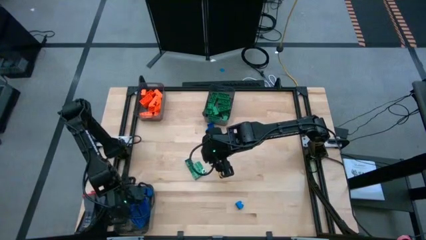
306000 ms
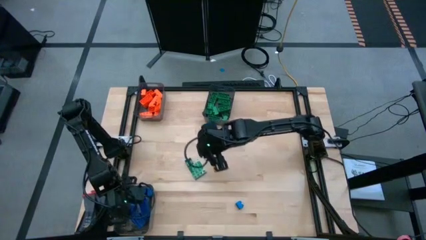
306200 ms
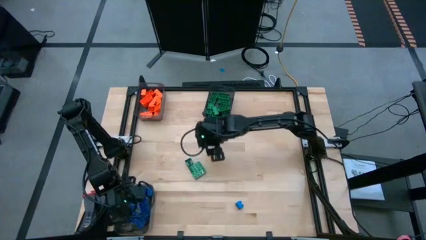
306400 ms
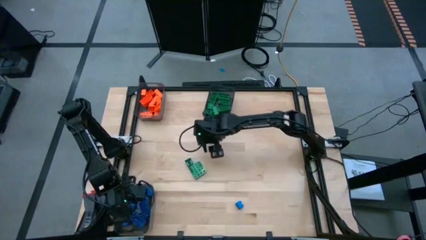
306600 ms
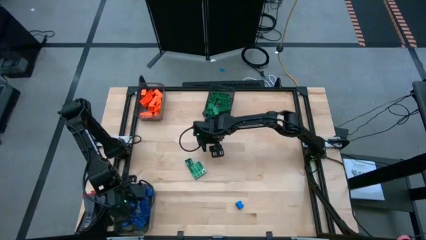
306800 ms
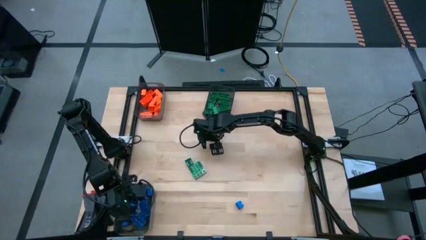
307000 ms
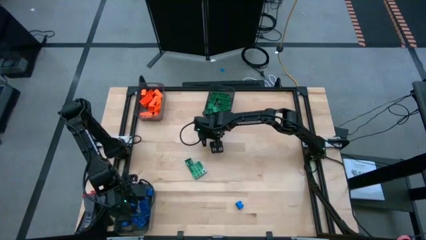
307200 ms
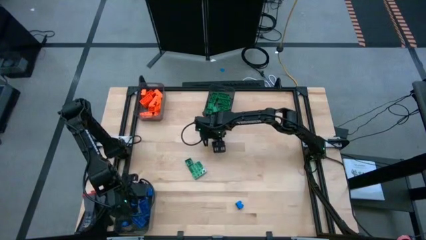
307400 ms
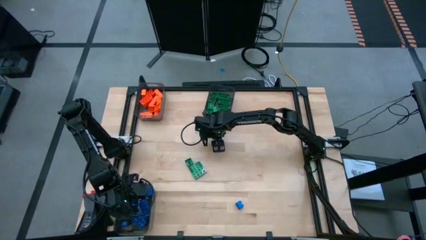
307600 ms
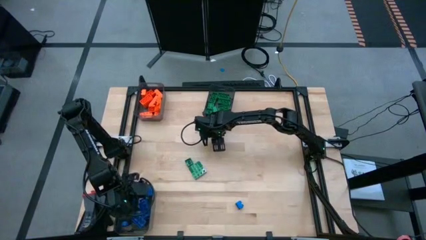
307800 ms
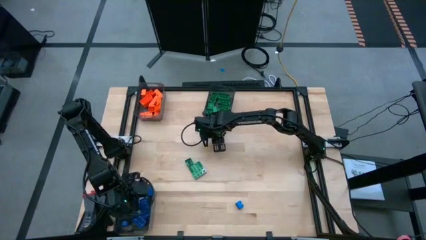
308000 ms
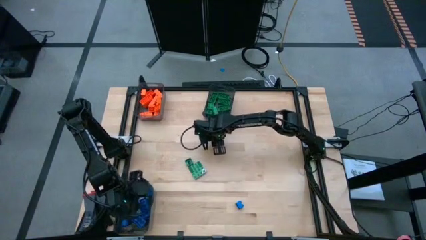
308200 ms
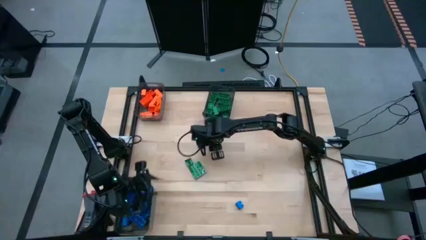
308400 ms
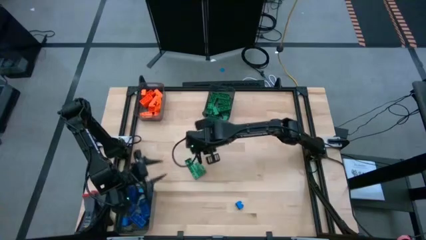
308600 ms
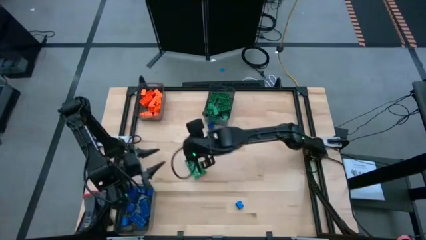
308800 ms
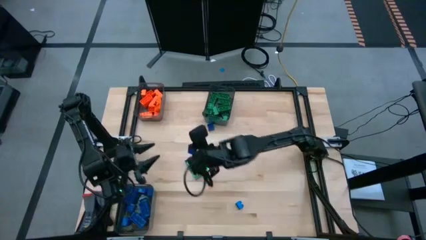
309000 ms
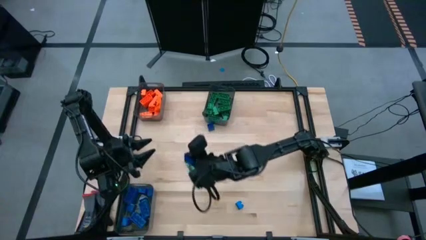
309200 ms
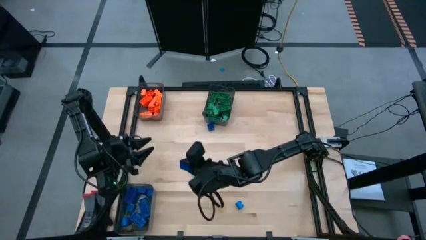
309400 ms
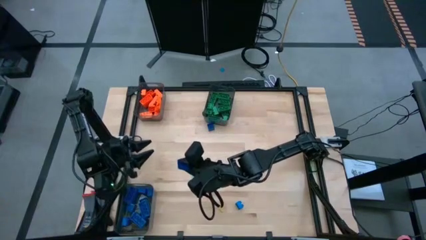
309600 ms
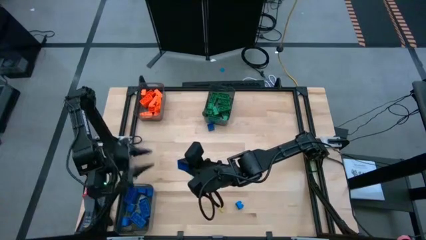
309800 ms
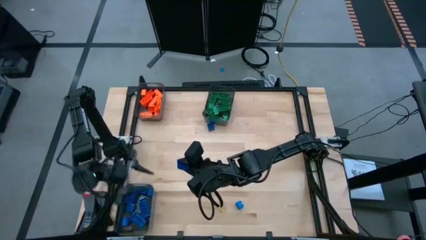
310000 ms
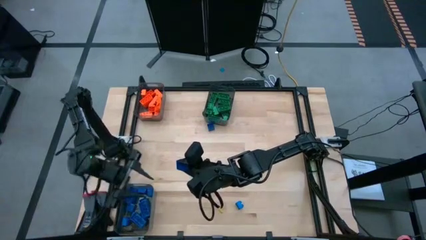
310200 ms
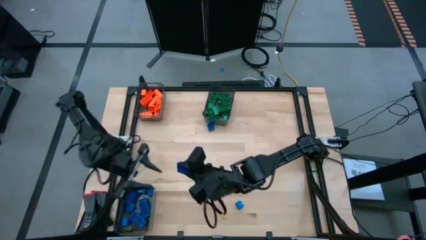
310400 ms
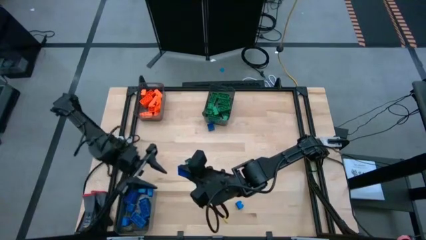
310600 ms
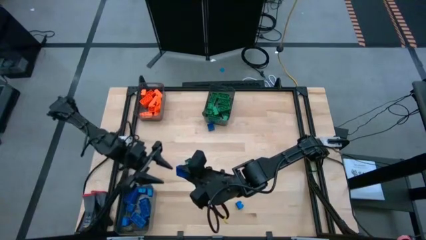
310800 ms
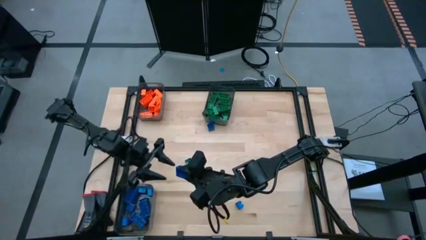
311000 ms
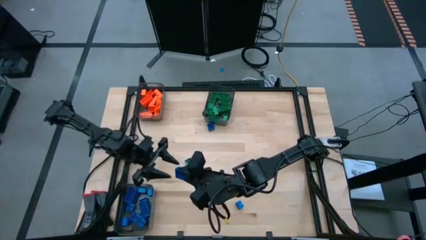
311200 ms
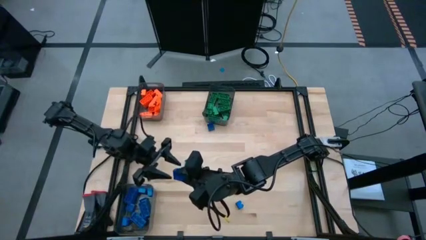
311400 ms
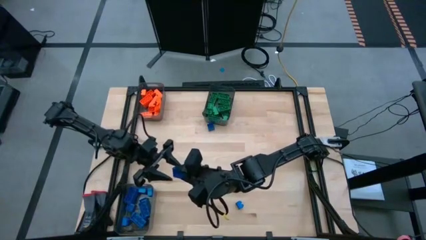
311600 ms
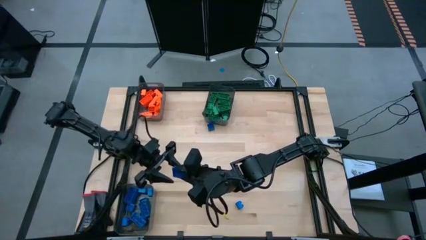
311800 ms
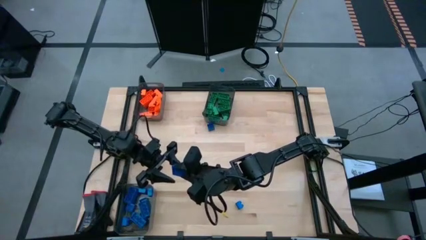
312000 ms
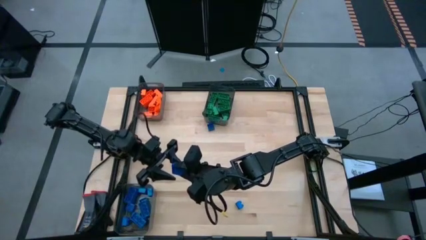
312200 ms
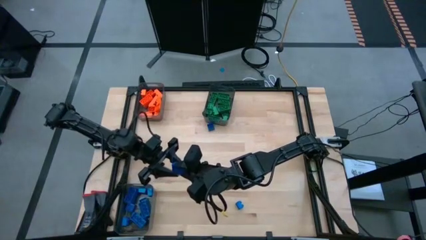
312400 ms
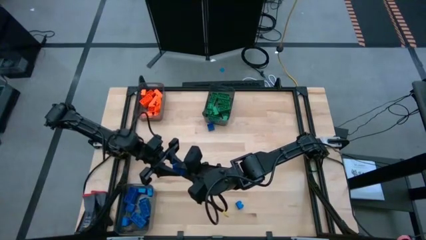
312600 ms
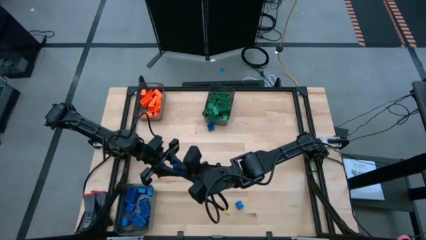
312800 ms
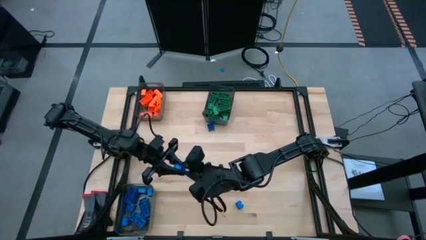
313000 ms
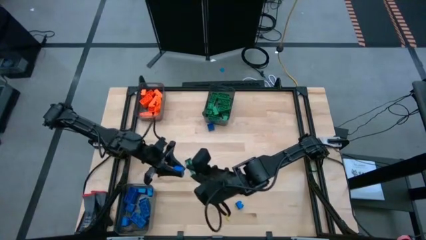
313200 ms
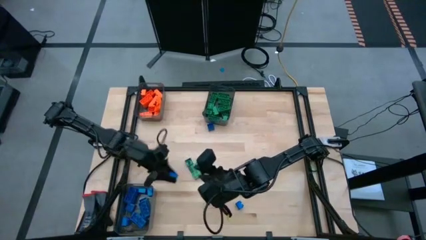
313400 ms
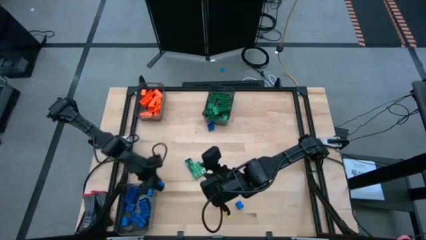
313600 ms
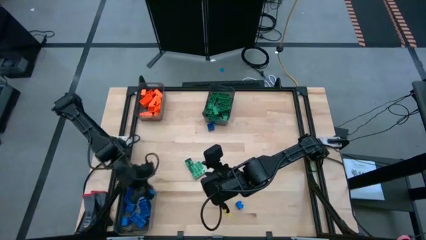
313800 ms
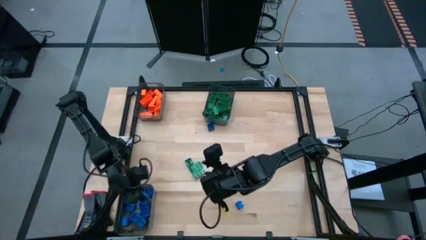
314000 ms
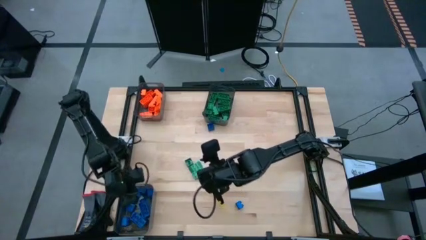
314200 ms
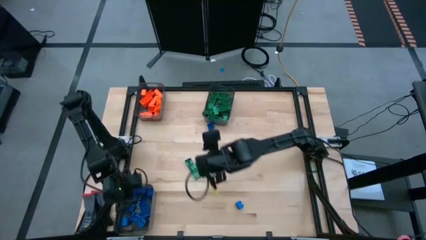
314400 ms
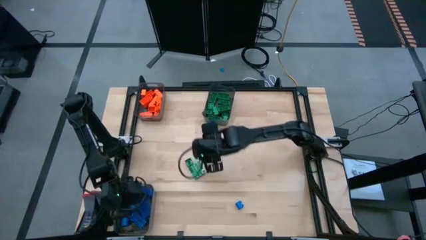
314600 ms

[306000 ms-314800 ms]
Task: Sort blocks
Put the blue game piece into the bottom left black transparent bin

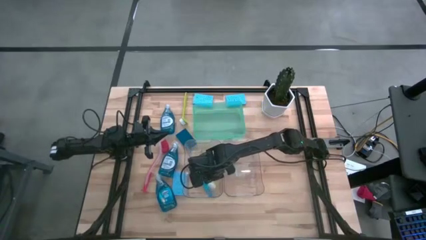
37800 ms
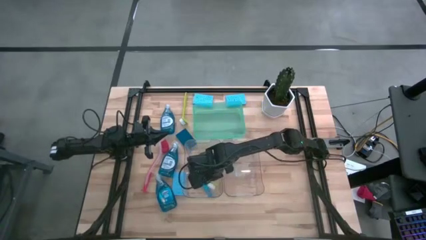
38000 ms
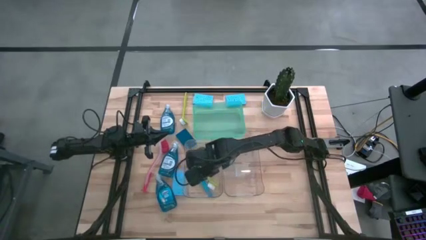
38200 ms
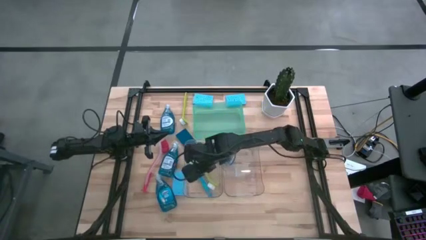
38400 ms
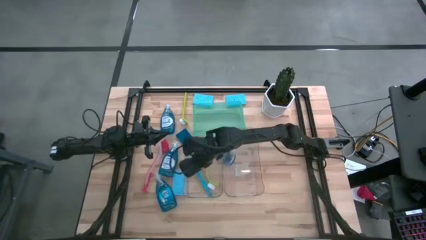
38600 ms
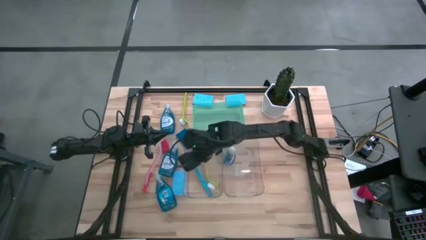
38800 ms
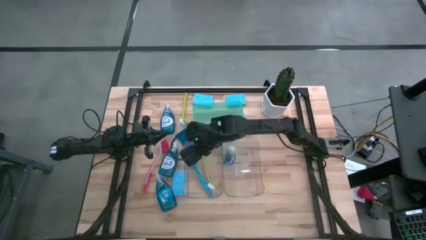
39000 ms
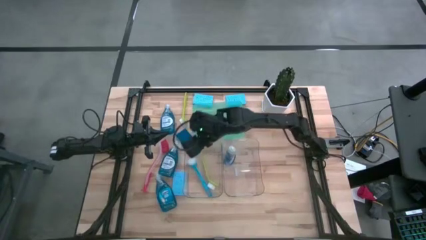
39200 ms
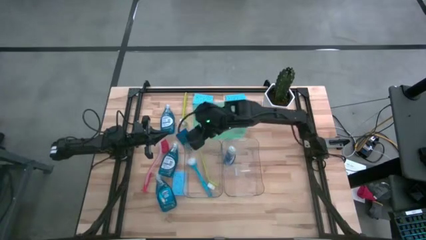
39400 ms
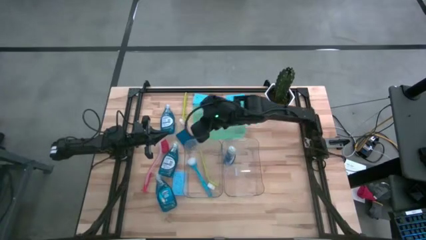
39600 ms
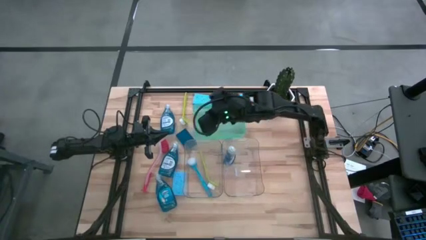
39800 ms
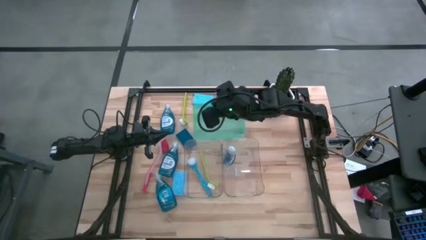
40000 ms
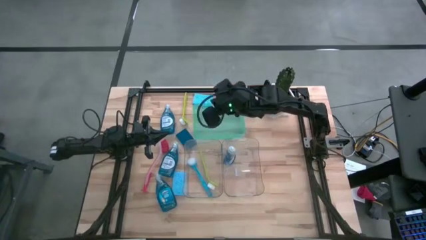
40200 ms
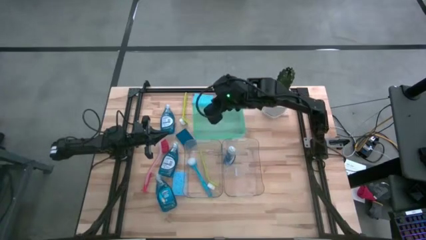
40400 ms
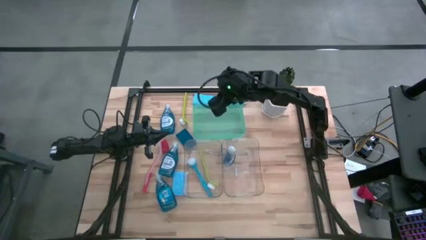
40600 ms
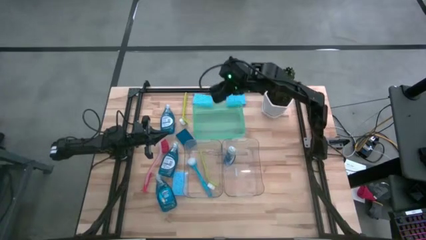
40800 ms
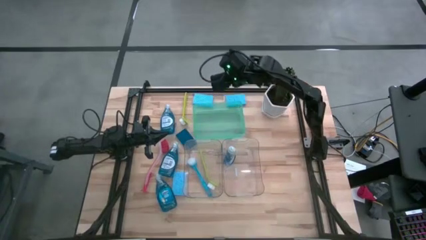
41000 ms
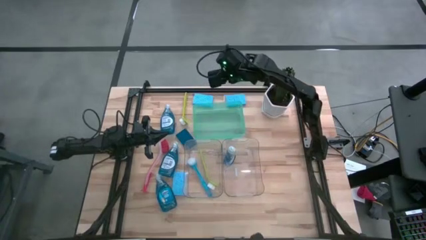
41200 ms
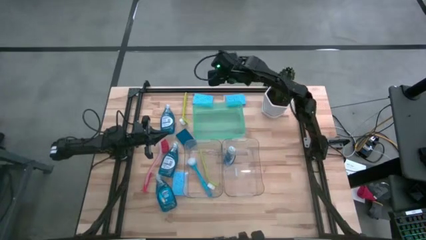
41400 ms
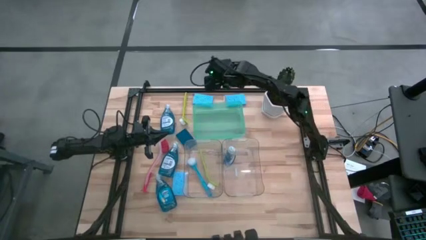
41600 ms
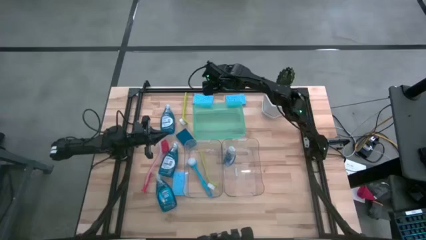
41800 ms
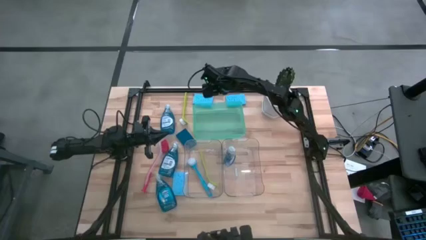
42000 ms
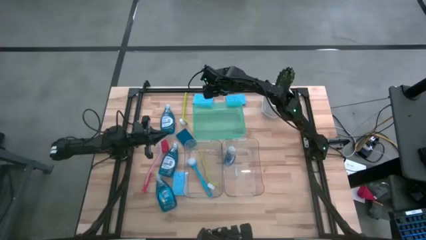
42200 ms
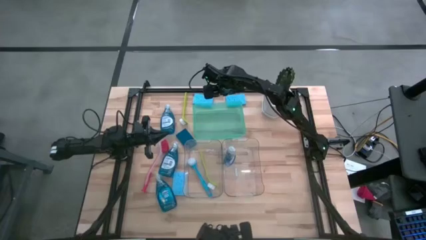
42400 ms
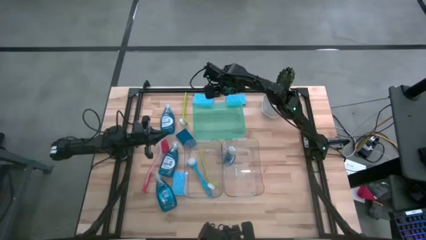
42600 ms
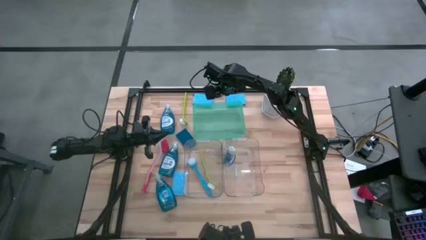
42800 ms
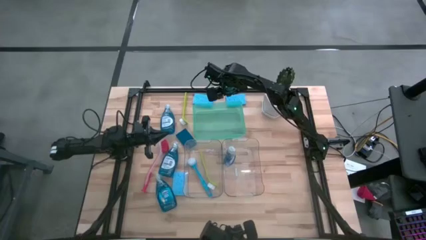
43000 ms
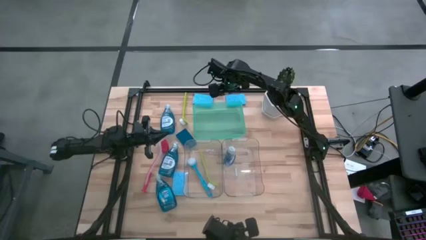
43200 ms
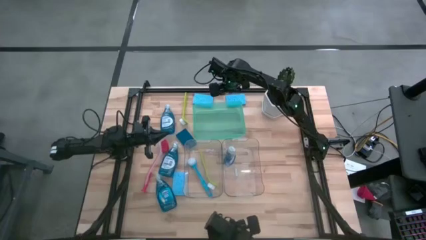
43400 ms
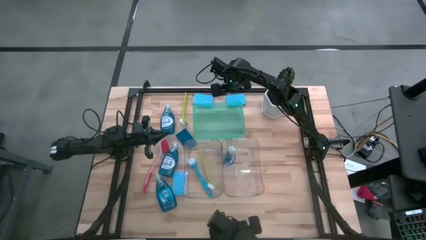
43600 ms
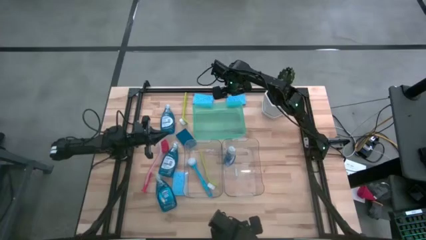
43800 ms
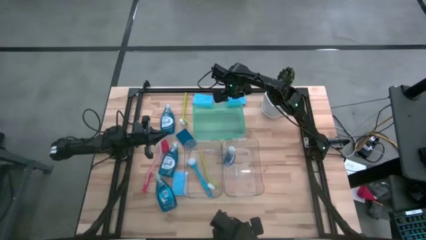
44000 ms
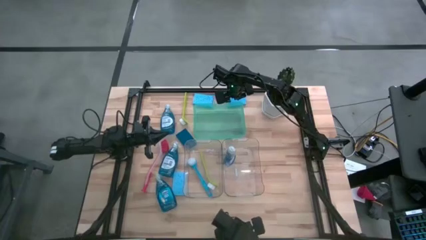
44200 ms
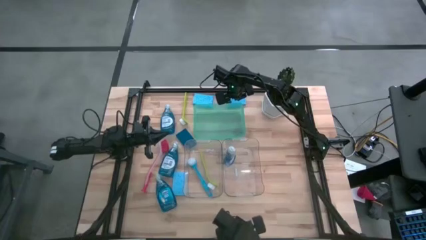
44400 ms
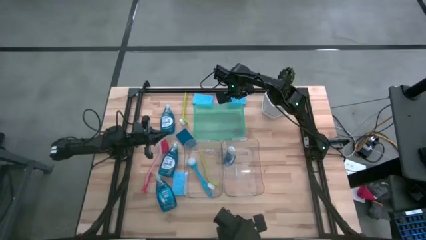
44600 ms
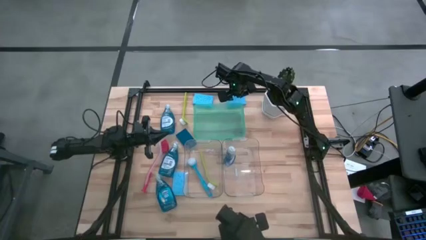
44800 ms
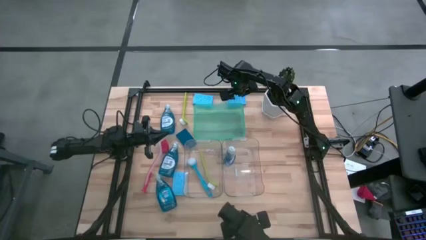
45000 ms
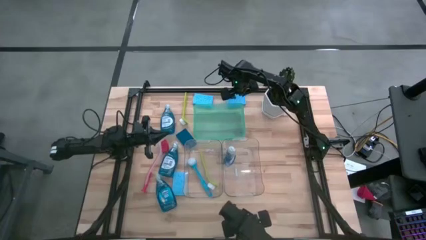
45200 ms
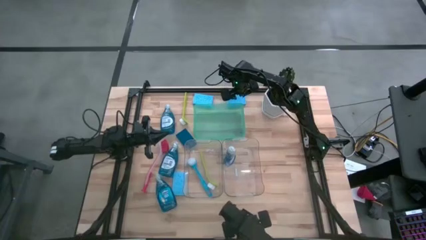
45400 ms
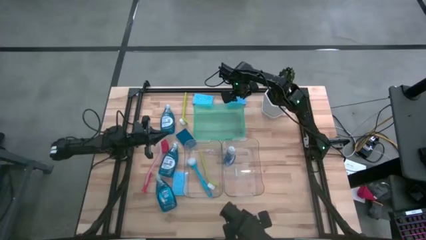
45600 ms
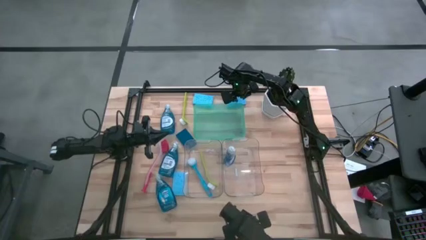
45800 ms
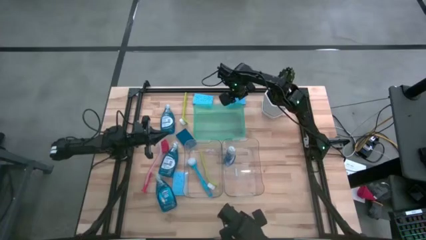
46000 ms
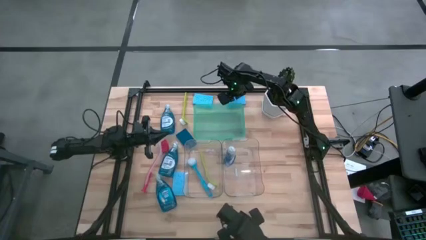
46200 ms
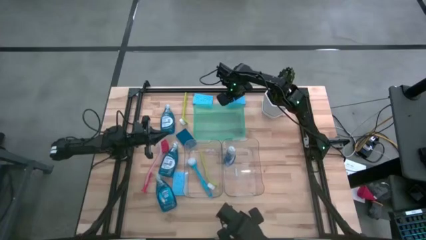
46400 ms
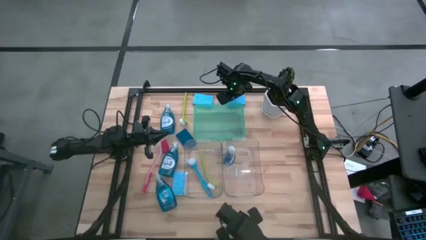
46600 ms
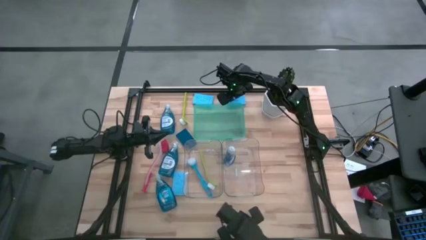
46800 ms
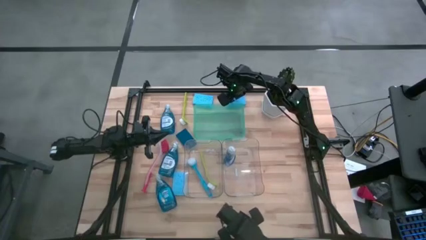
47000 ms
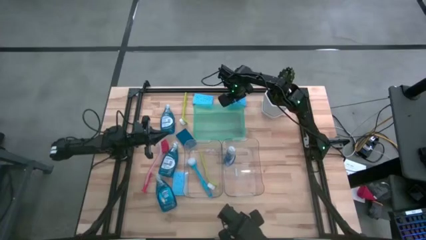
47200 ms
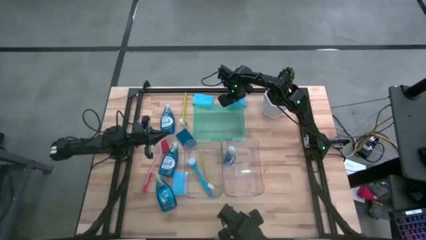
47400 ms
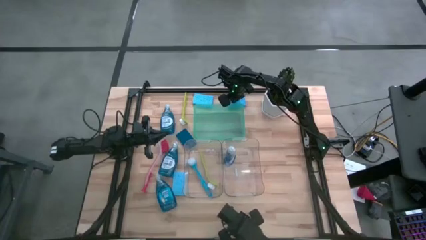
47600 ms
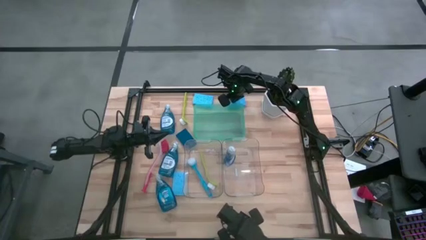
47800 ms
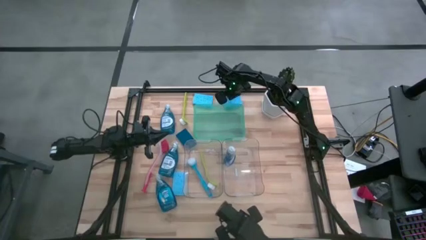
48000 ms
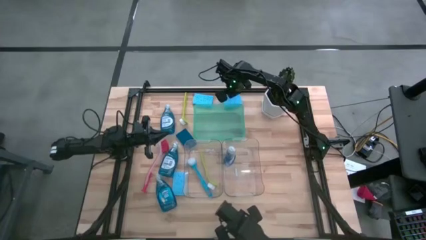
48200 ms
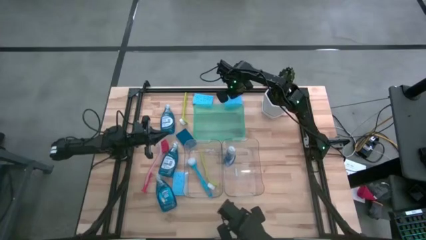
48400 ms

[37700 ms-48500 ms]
Task: Pick & Place Kitchen Sink Supplies
Put the blue sponge into the green bin
